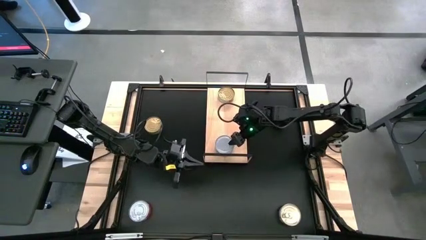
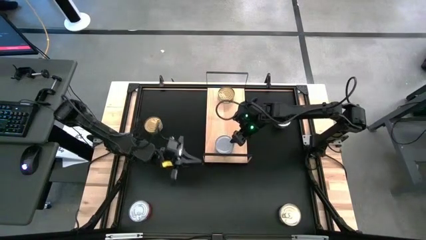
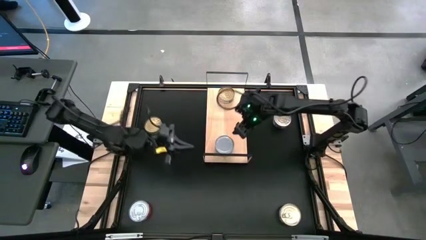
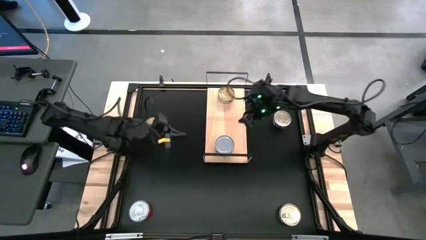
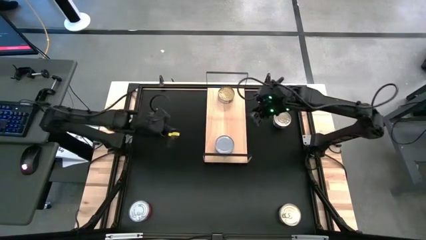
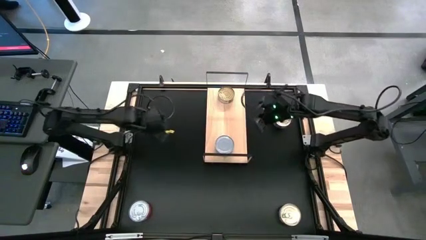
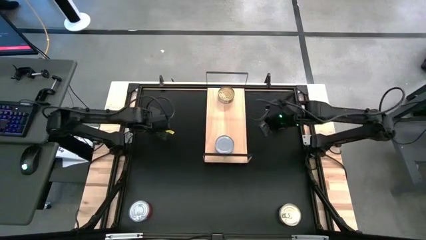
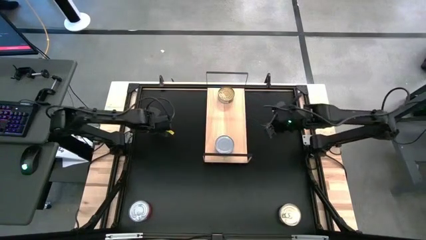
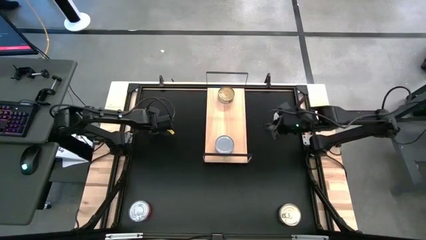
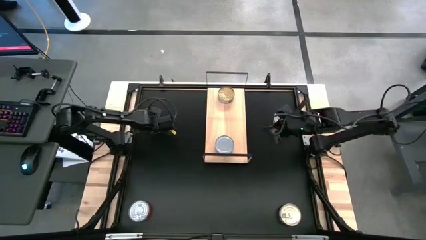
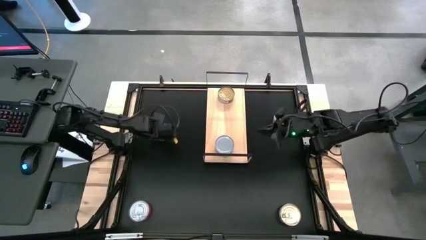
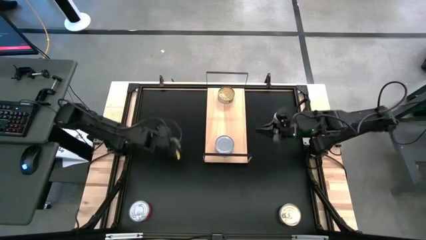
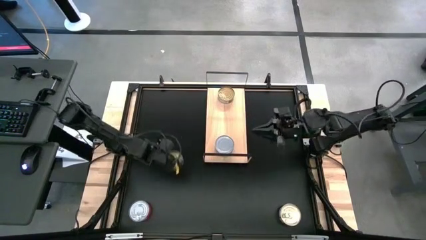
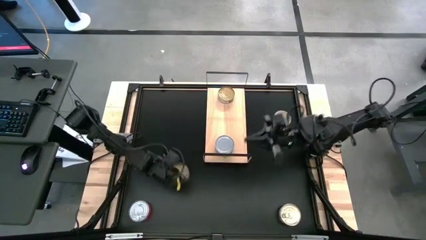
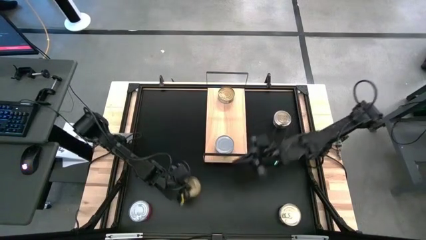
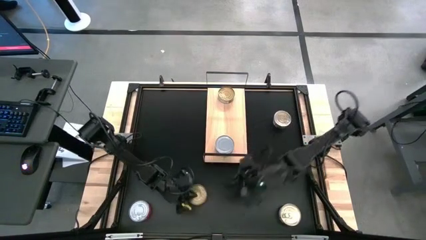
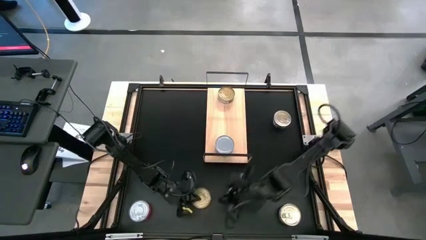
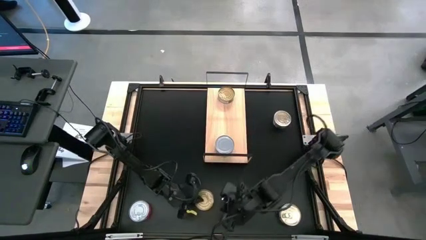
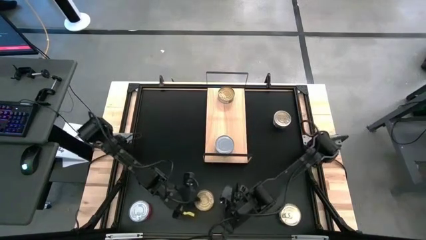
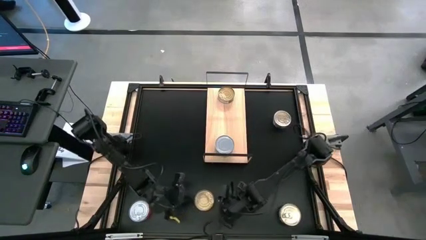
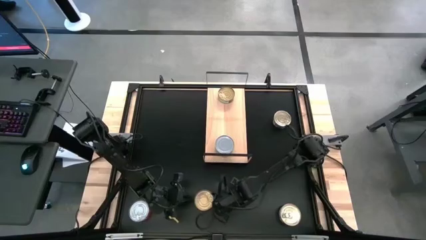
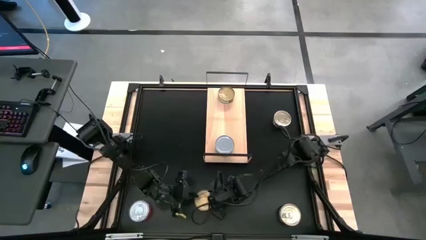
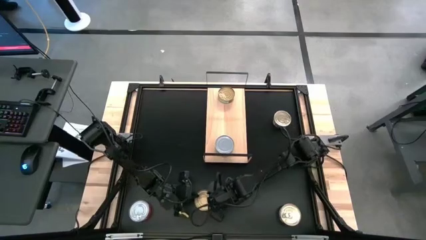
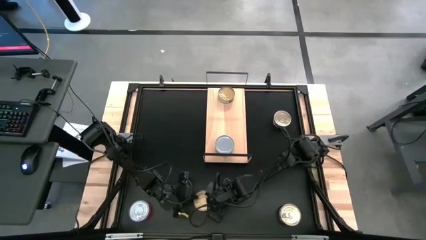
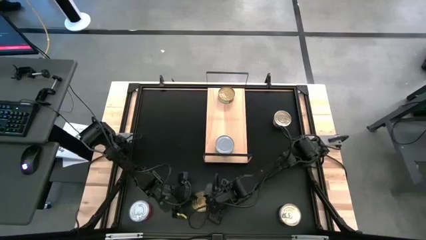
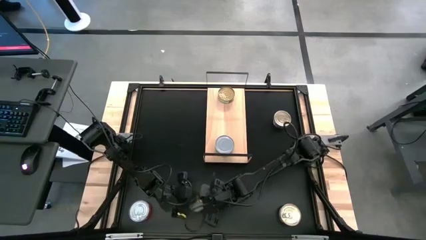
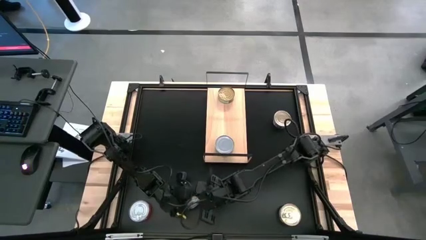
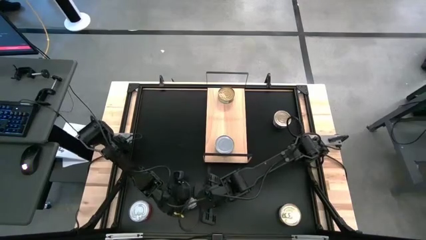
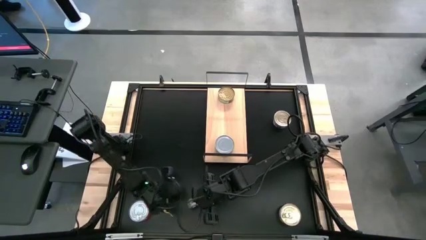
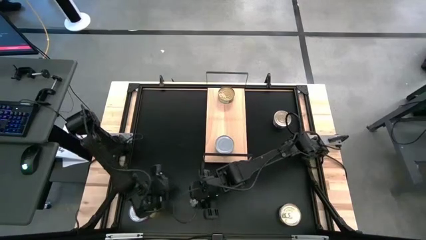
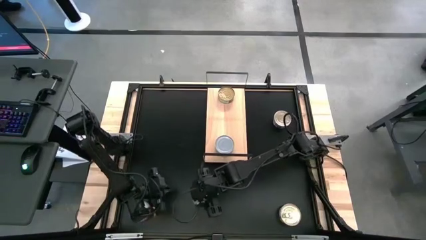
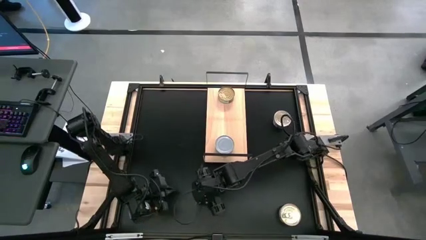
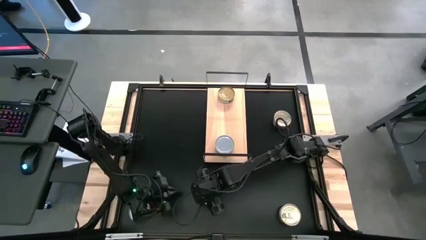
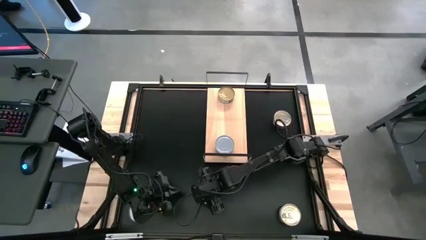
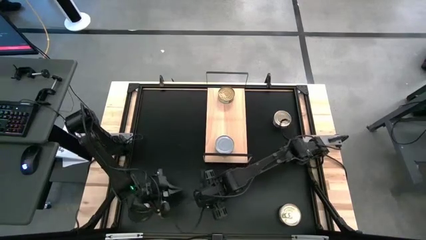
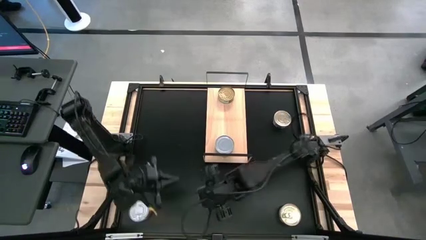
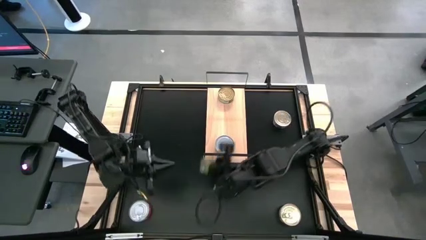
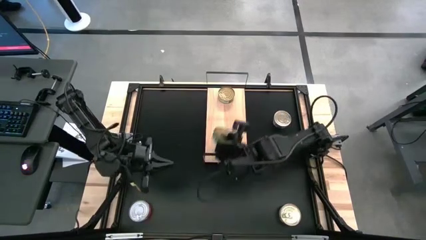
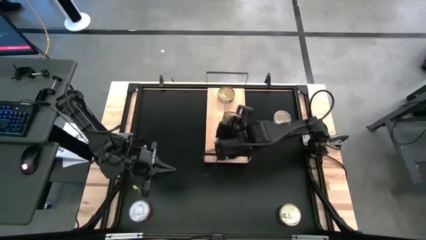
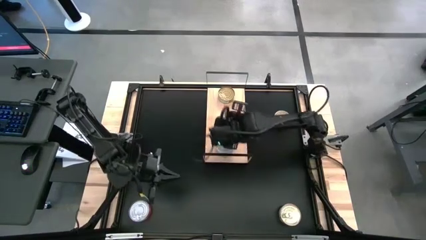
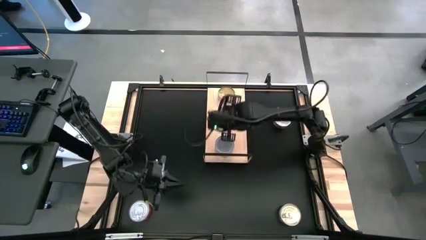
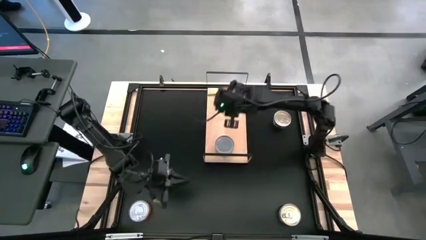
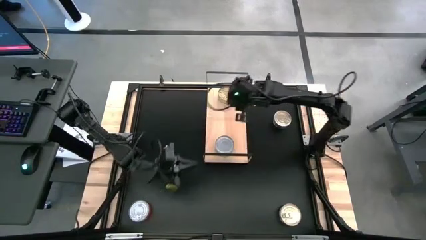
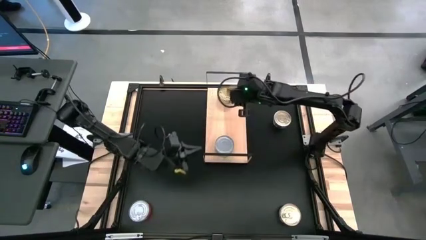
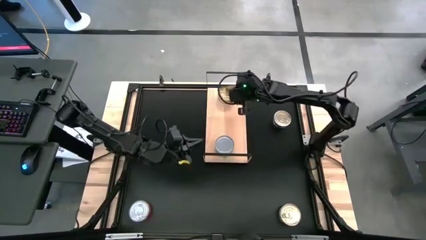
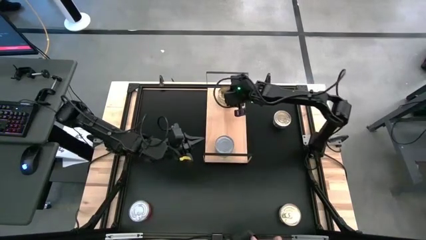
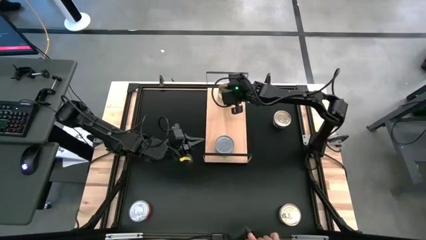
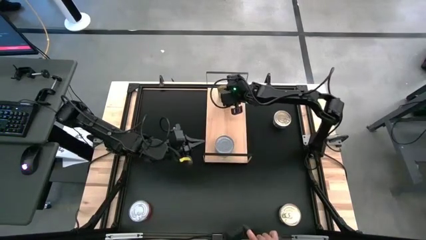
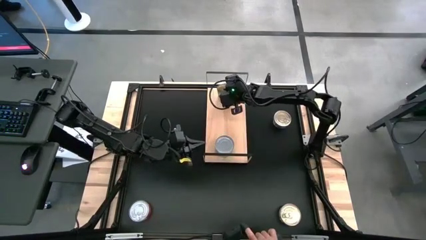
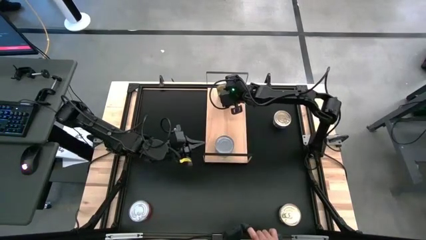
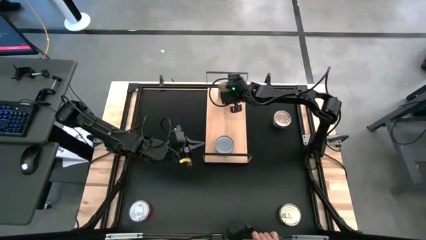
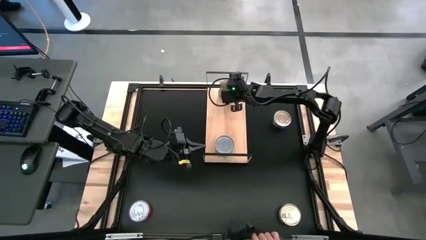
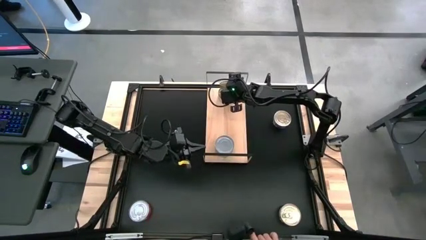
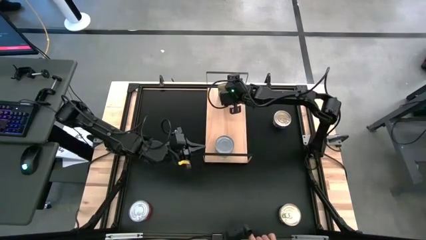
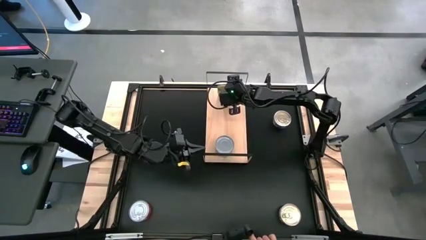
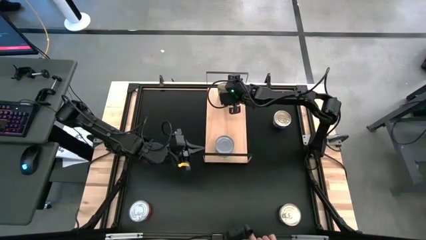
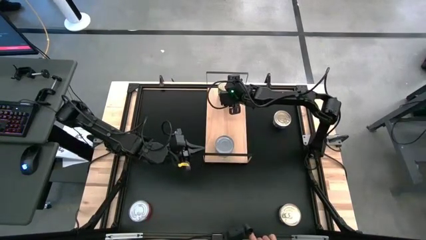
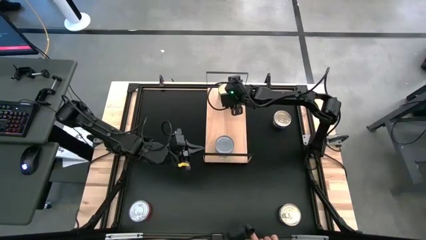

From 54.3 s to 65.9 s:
Task: Stack canned seafood by type on shelf
Stack the green tuna can on top of the other green tuna can on the shelf
